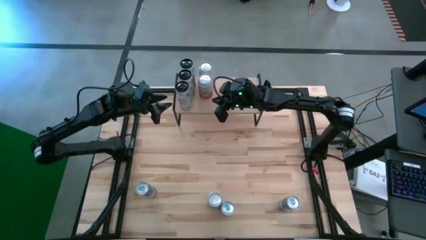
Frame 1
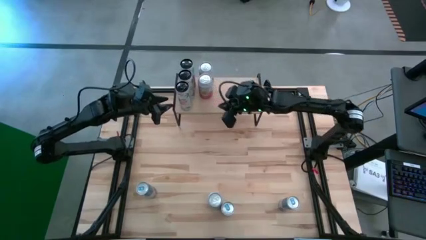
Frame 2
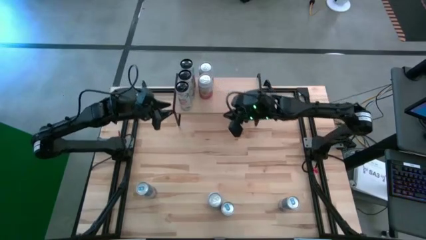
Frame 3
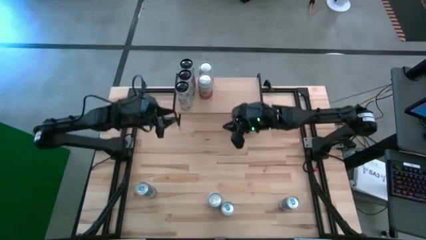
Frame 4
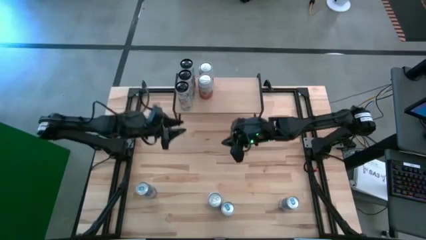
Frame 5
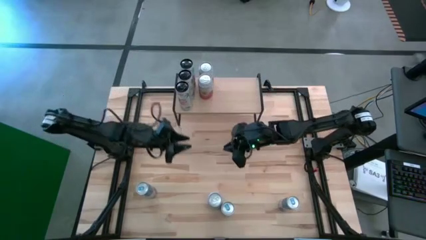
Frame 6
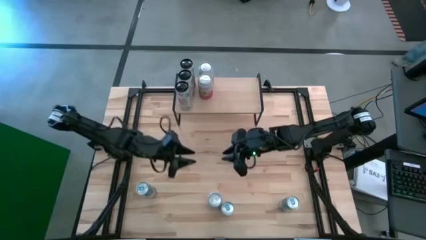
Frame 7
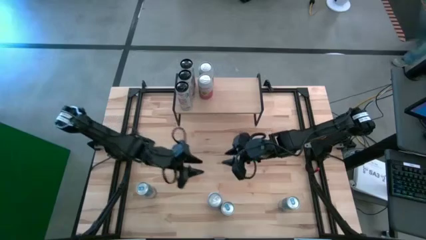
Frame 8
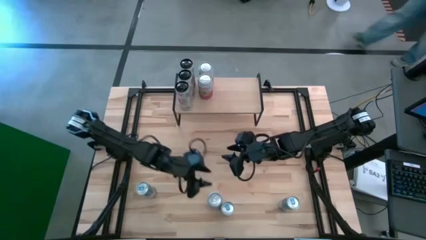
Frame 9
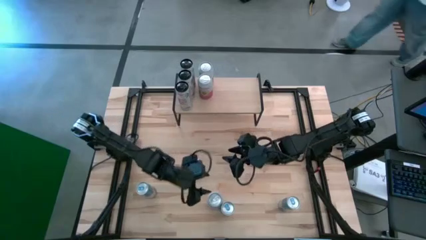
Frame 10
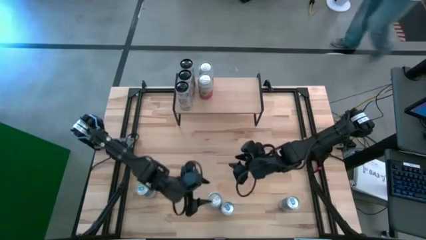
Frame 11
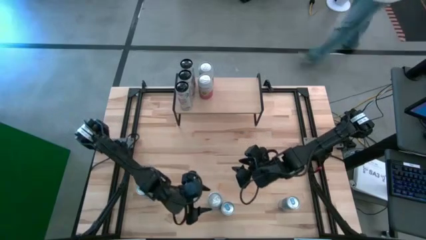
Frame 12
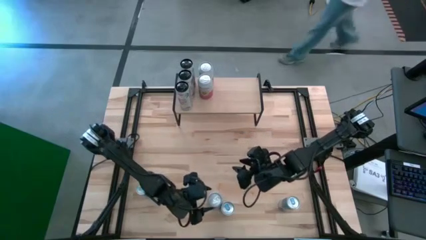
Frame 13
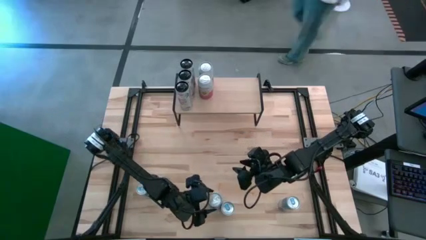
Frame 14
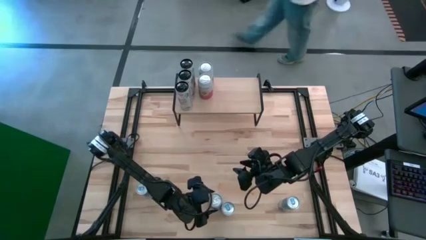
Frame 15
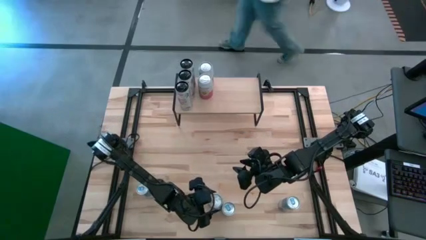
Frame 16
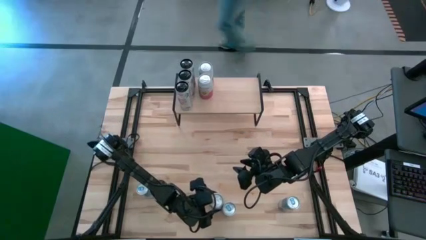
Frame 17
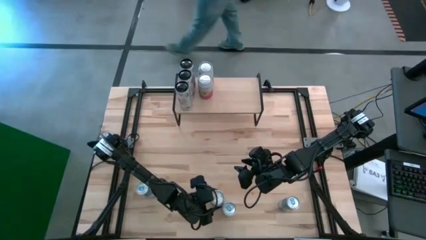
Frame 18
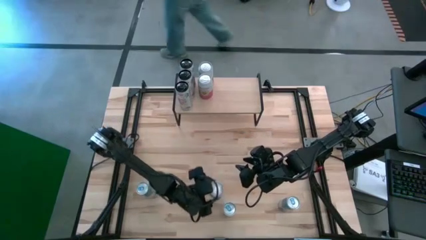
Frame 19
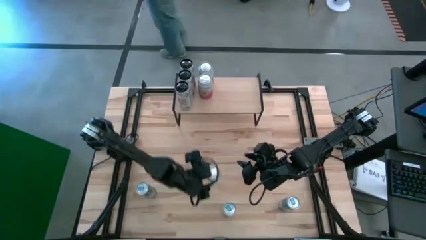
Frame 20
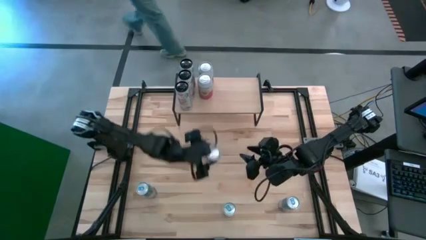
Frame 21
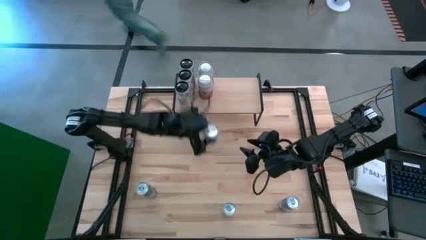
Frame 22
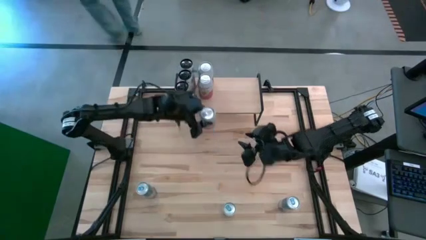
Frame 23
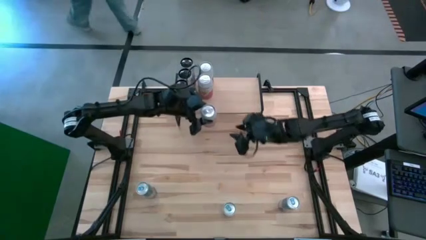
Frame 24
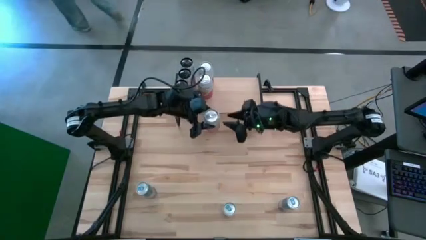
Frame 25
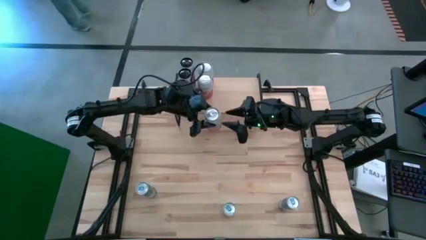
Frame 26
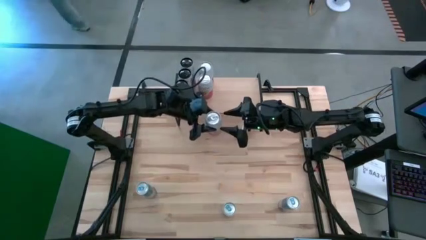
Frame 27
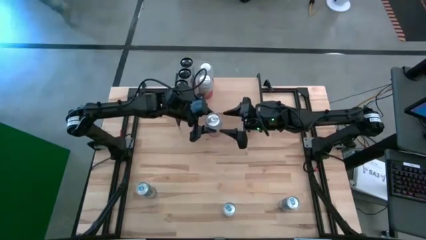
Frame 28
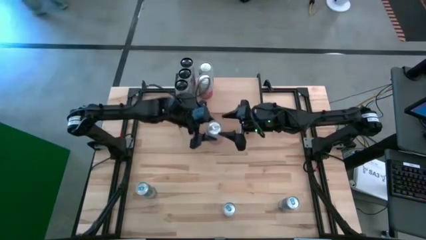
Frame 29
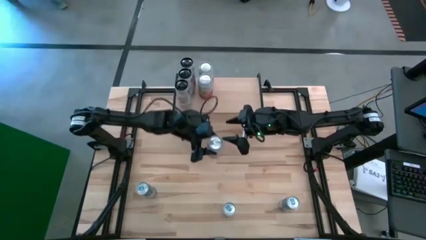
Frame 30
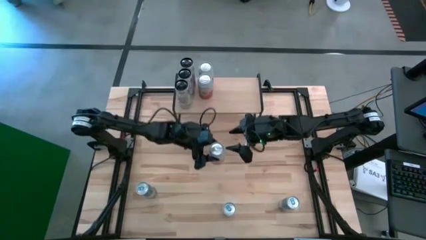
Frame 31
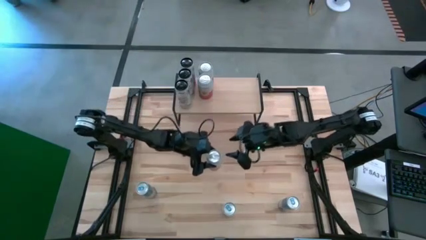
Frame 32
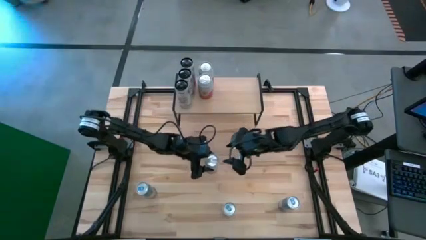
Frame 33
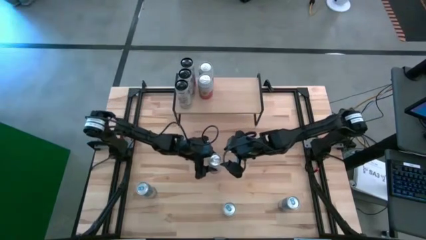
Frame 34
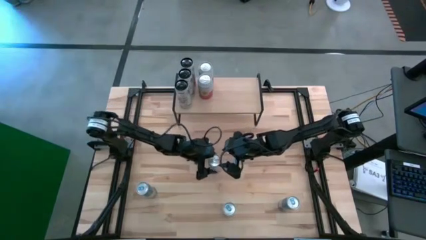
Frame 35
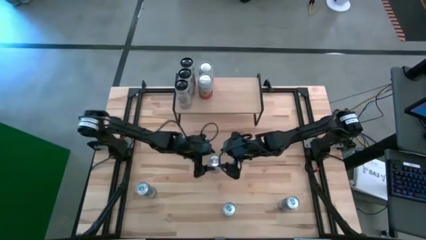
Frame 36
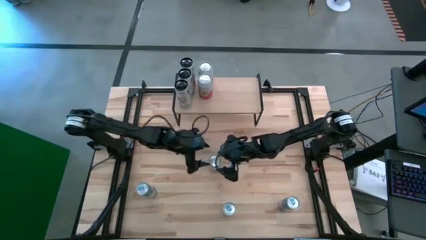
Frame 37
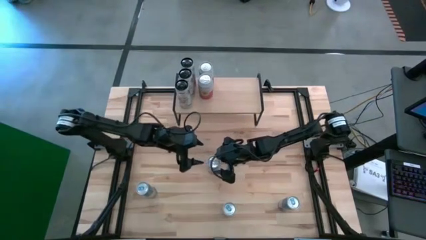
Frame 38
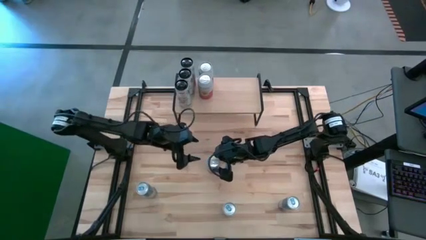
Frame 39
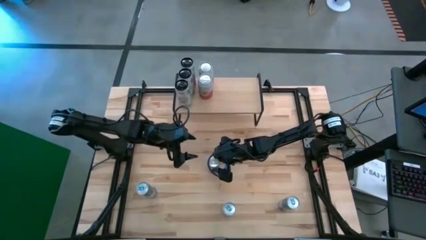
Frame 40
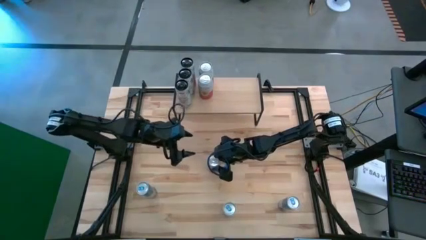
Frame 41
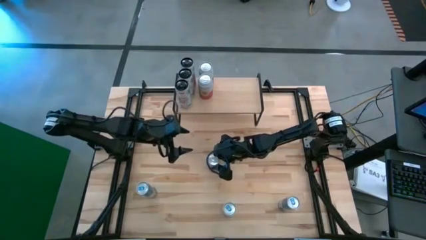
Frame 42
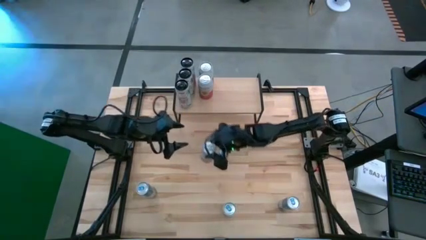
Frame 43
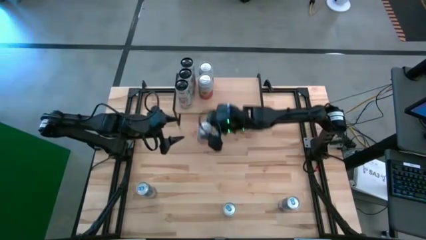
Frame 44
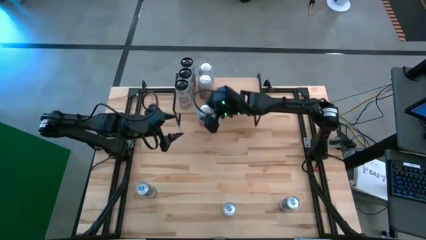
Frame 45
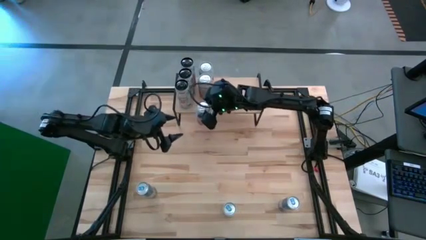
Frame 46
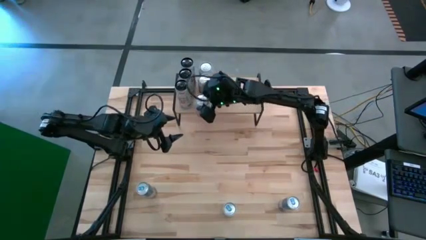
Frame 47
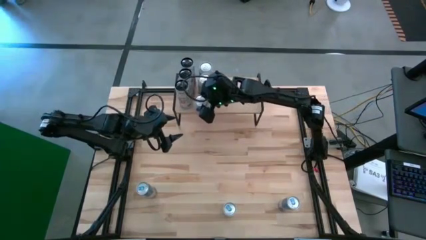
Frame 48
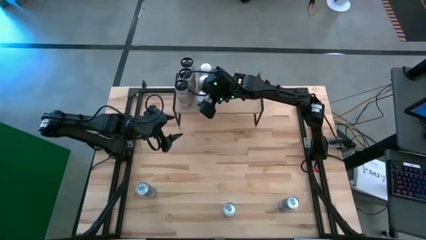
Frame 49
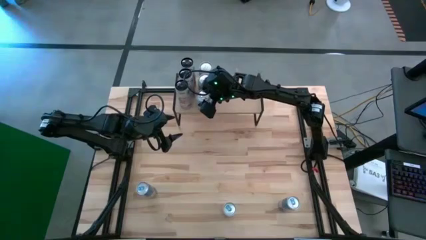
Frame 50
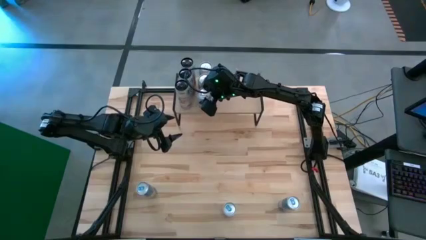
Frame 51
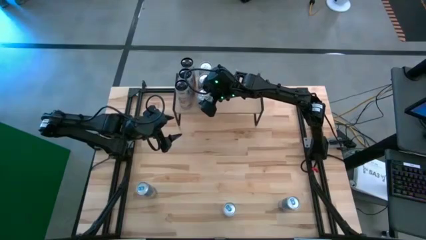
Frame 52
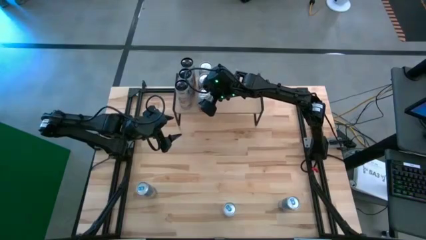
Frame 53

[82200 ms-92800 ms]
Task: Place canned beverage on shelf
Put the pink-white soda can on the shelf aligned with the other pink-white soda cans
